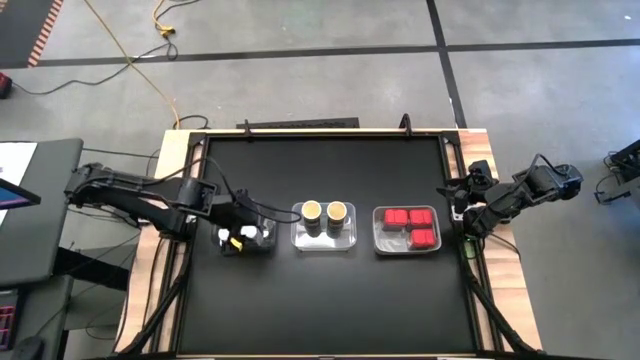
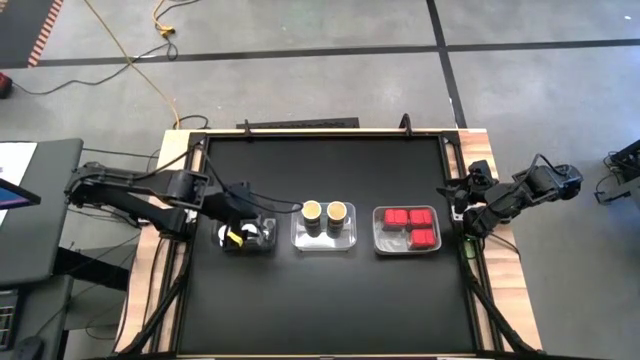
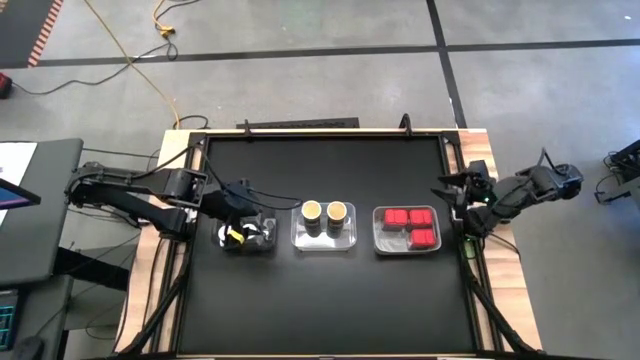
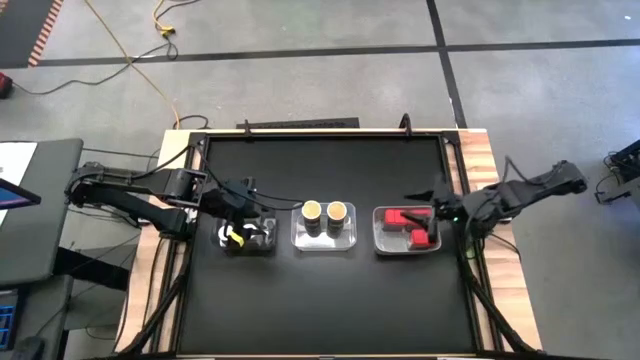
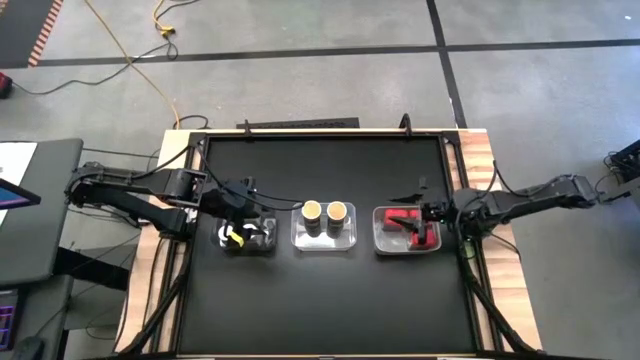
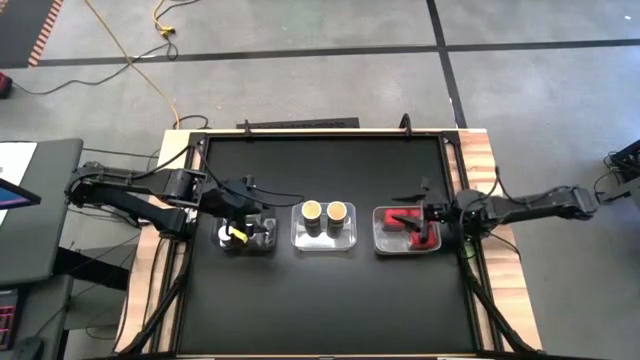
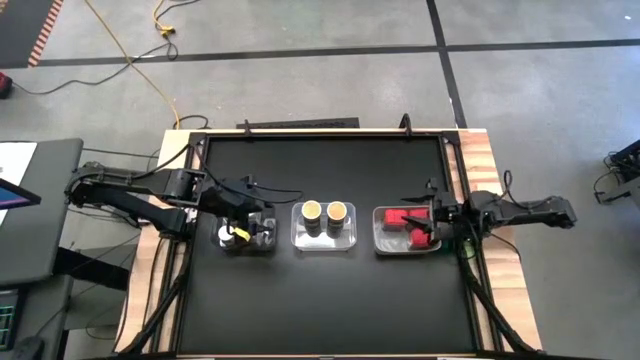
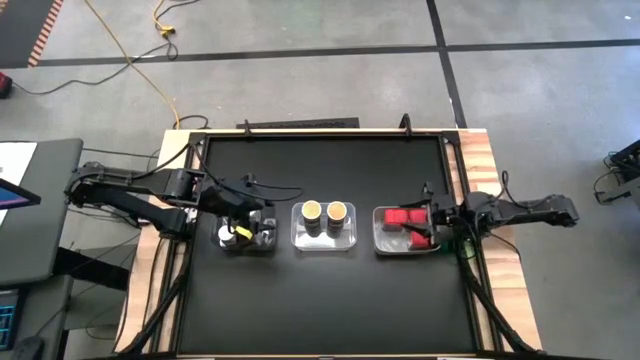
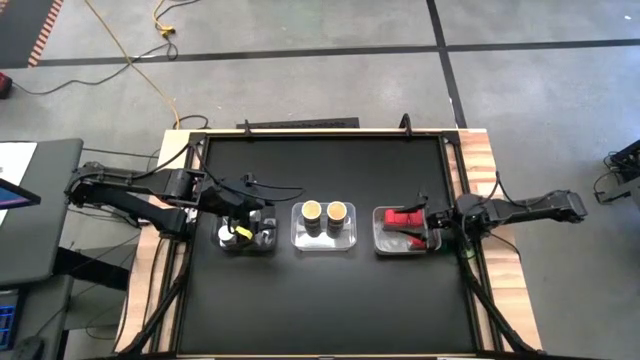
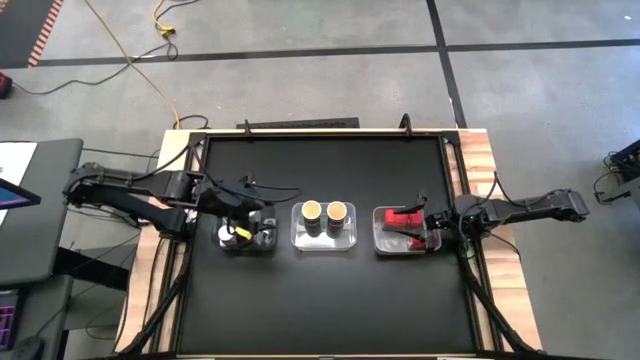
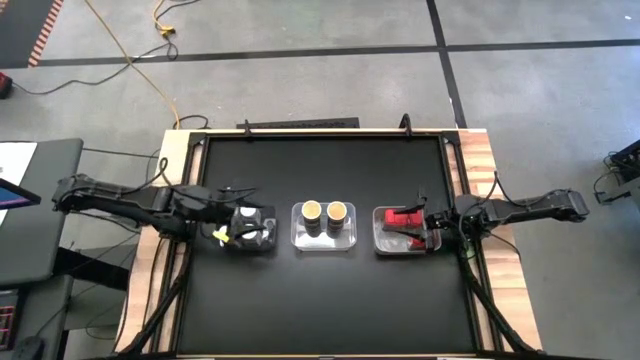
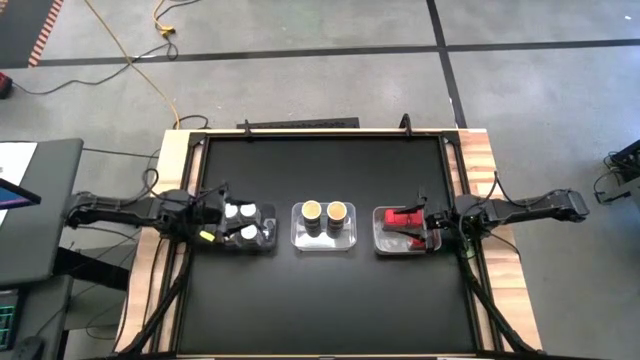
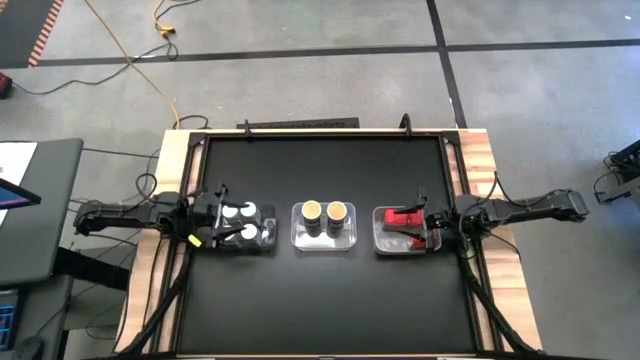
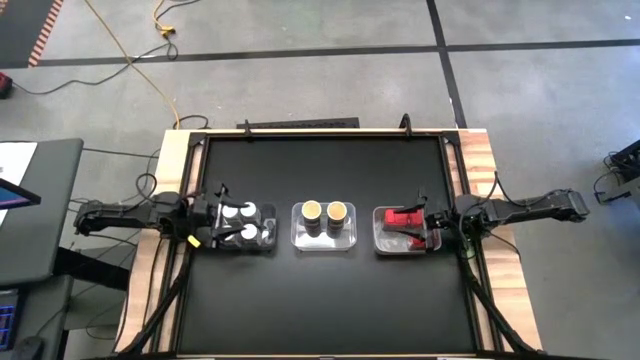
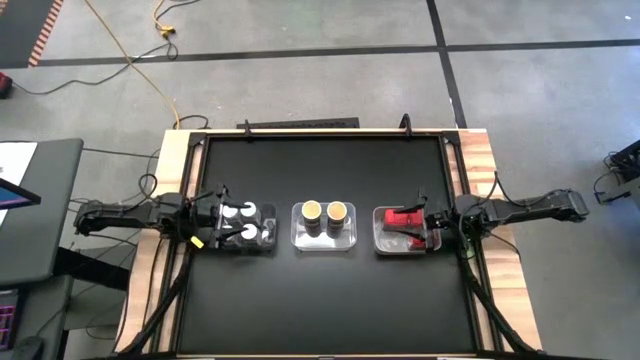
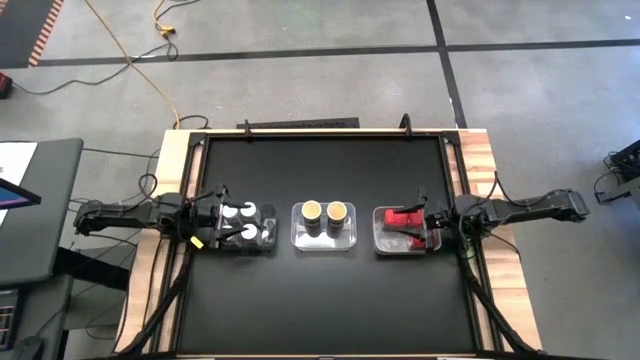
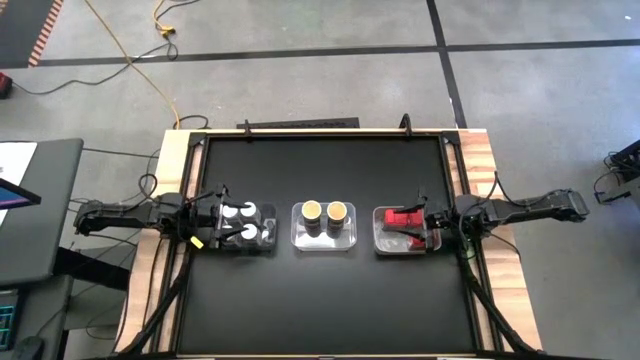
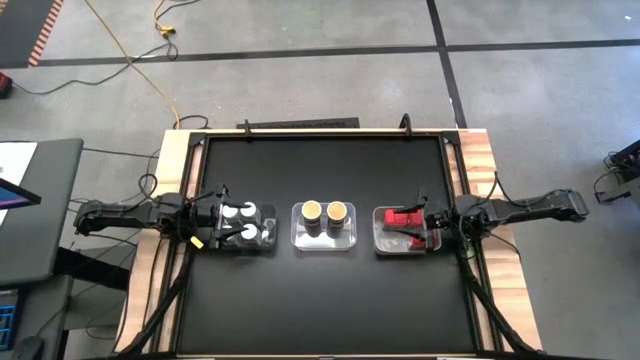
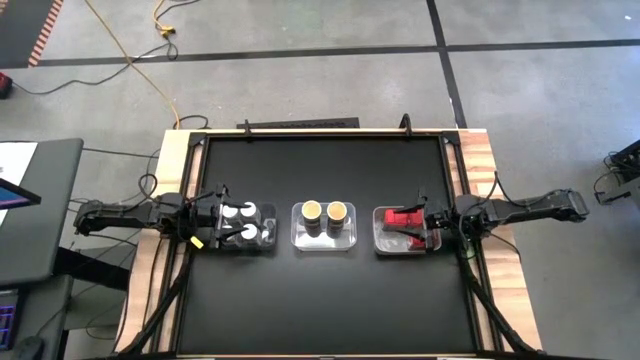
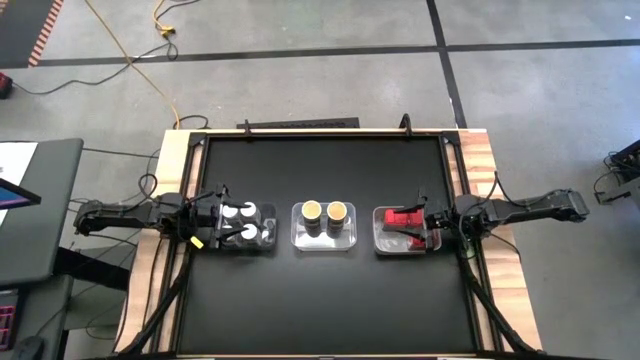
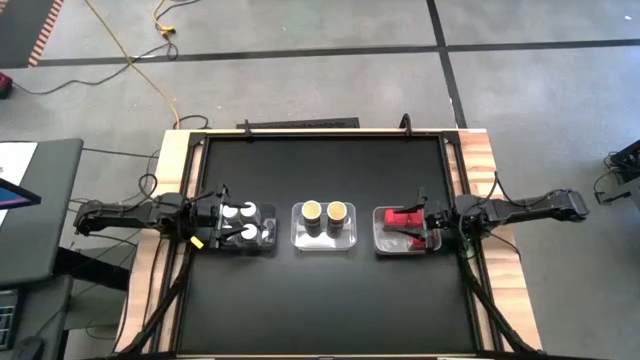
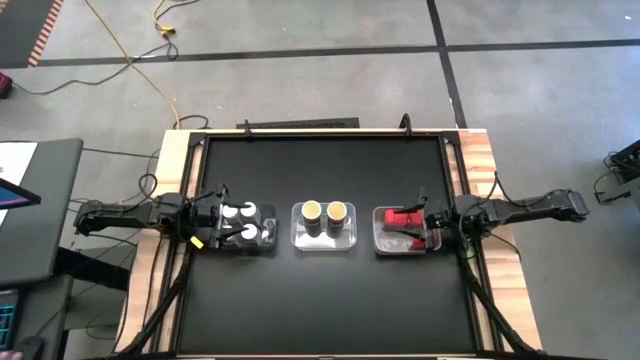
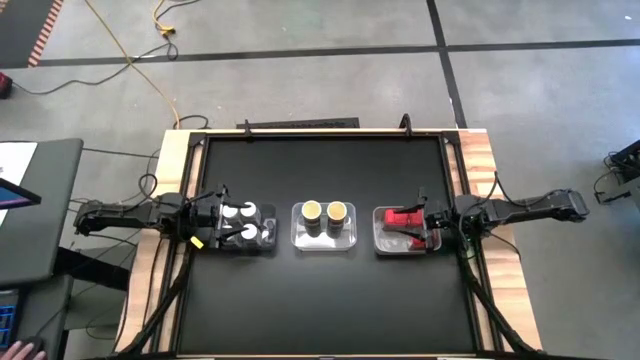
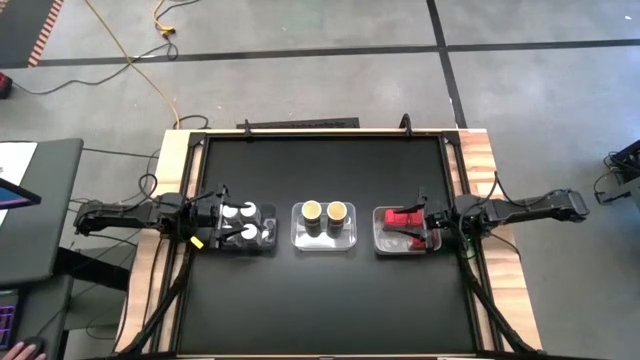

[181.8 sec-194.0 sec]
Task: Sort spices by type
Return to Home Position

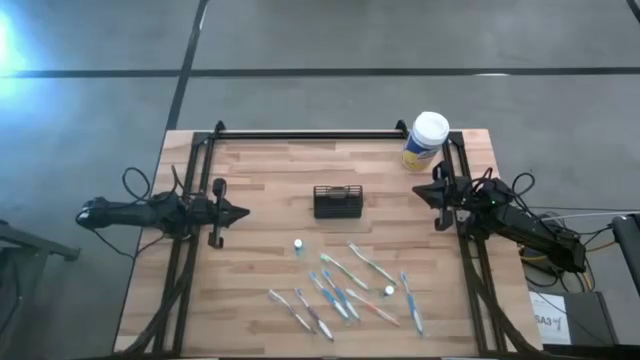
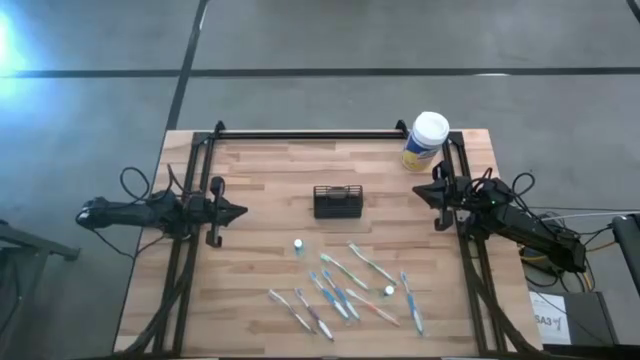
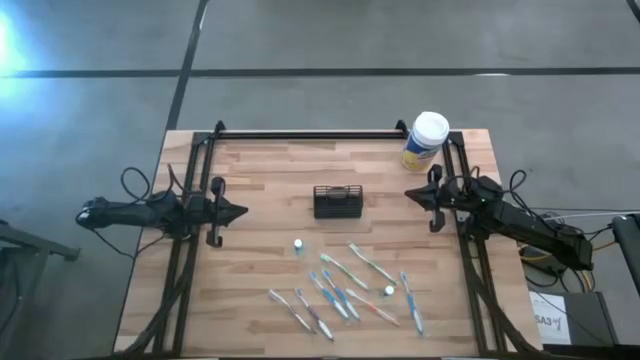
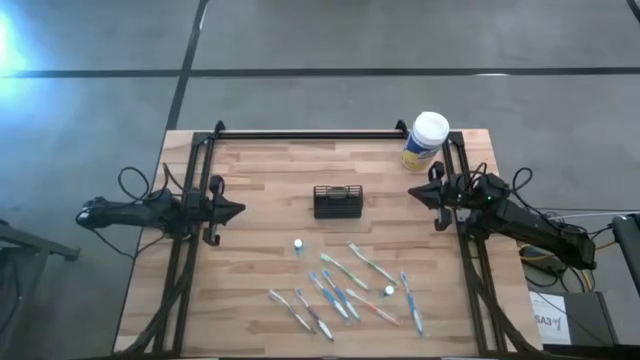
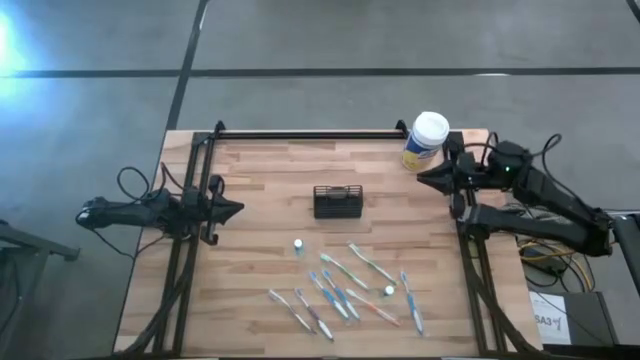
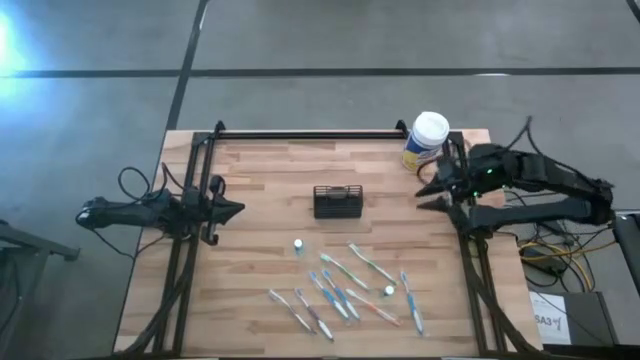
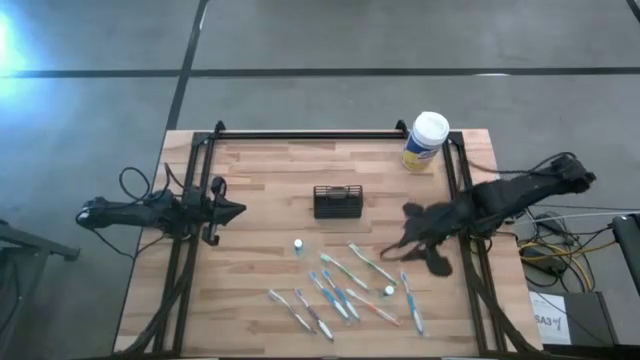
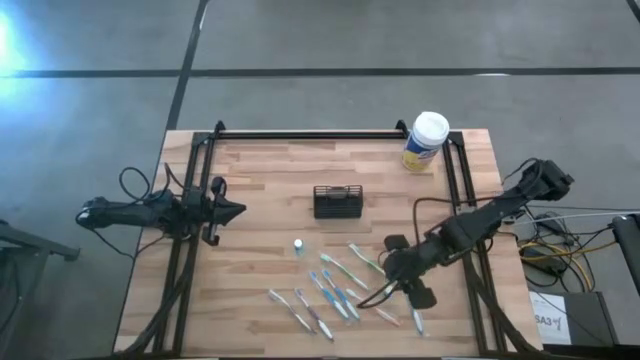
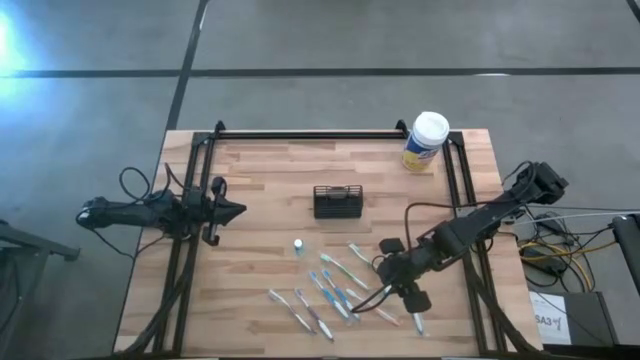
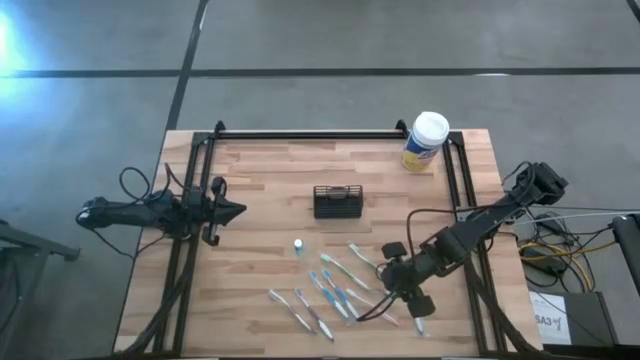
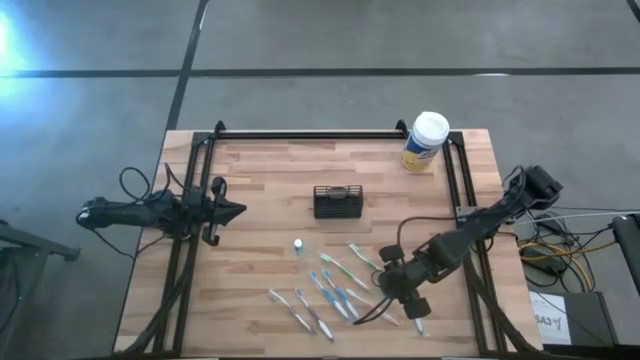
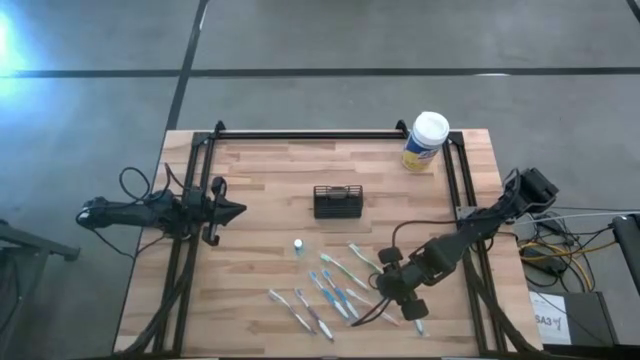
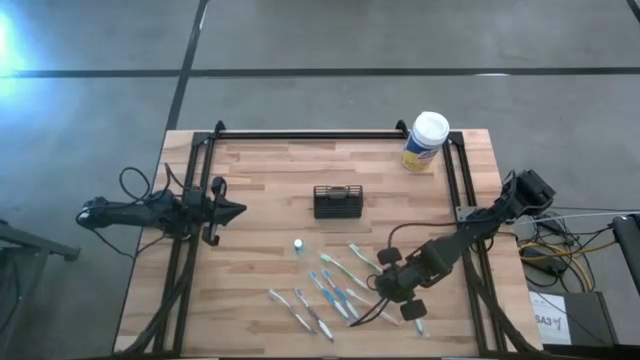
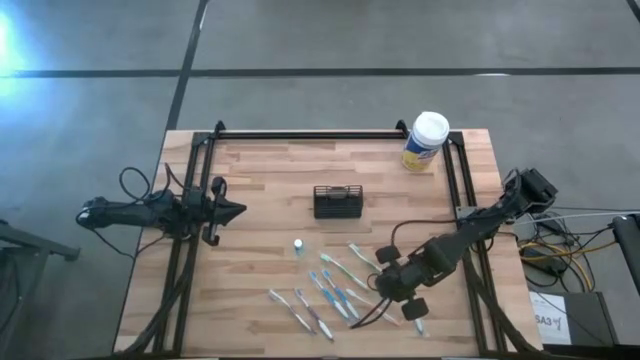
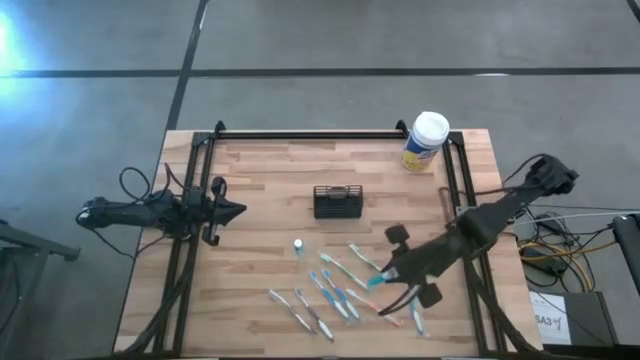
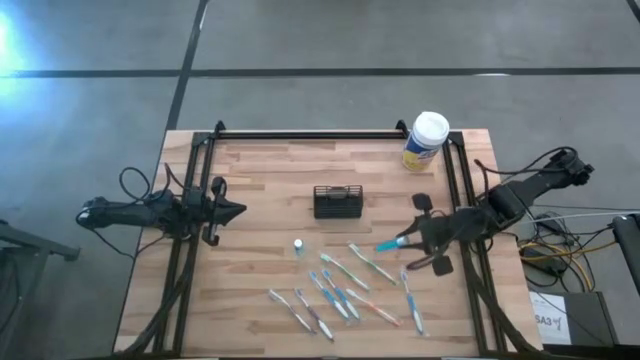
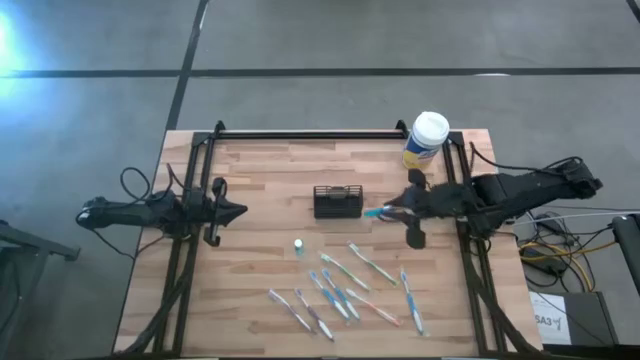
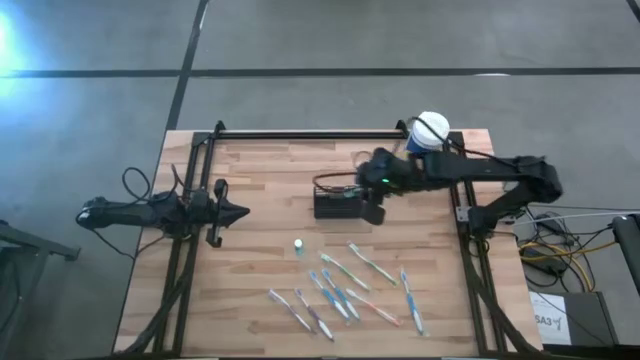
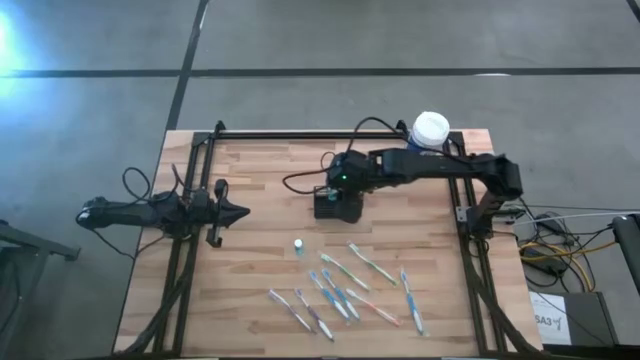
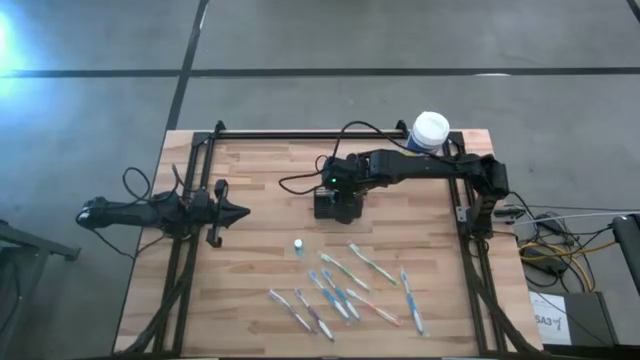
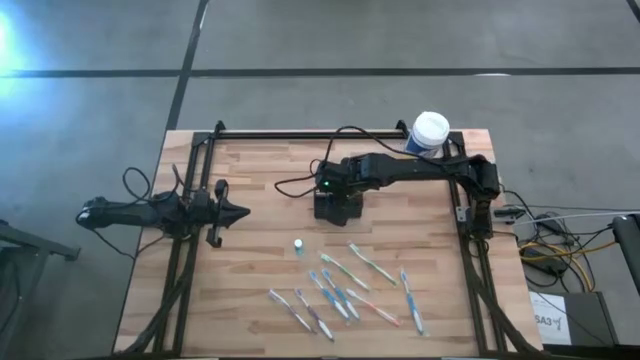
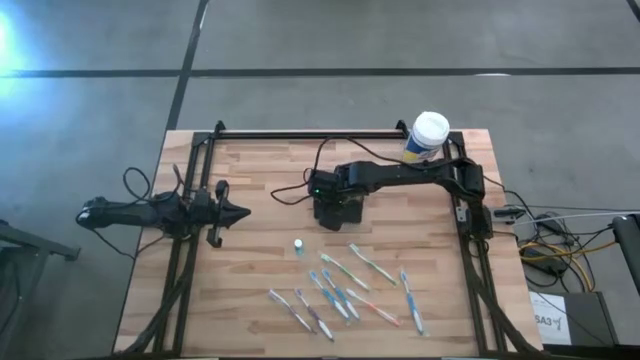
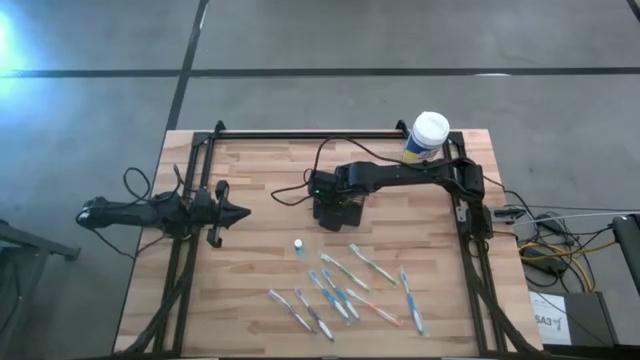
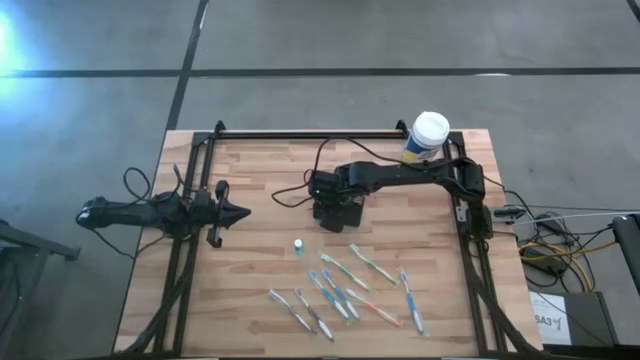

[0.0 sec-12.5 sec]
Task: Pick & Place toothbrushing station
Put the right mouthwash bottle into the wire organizer
